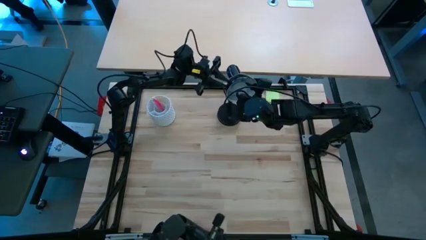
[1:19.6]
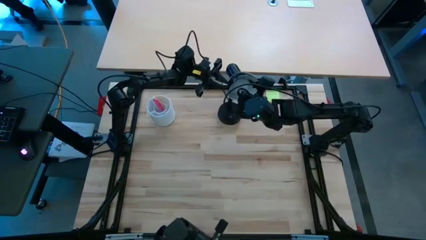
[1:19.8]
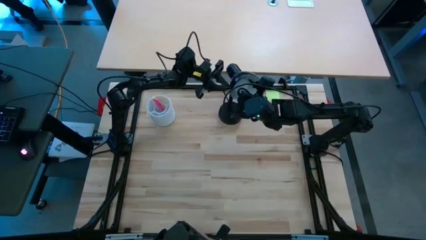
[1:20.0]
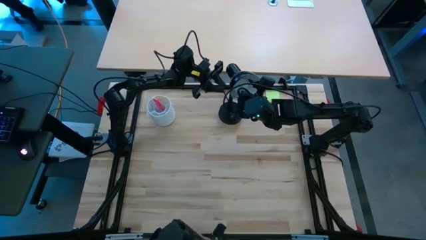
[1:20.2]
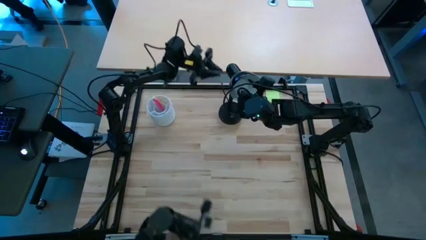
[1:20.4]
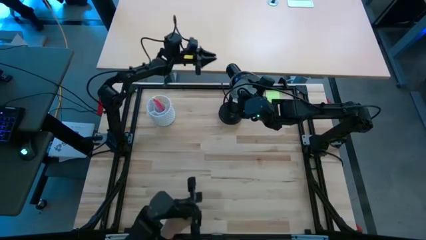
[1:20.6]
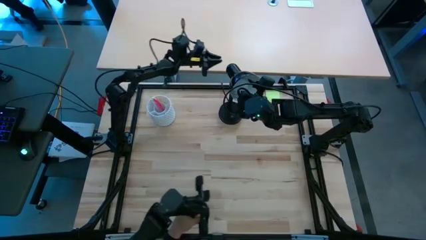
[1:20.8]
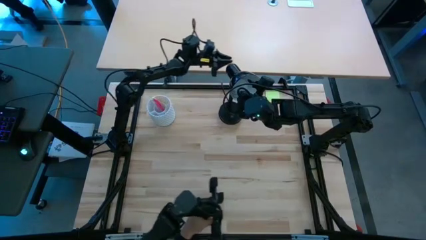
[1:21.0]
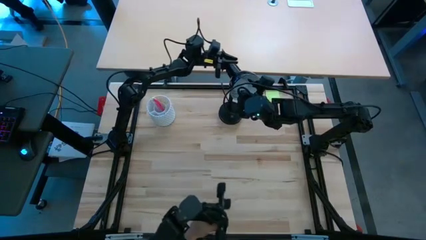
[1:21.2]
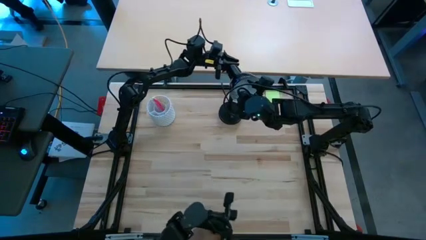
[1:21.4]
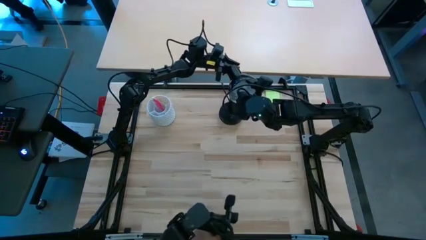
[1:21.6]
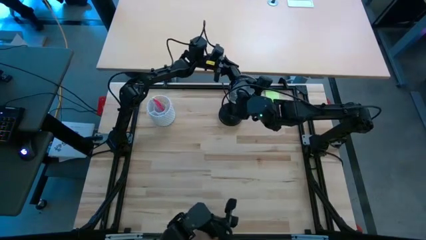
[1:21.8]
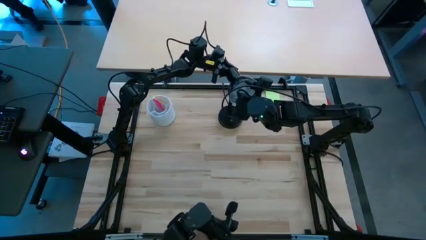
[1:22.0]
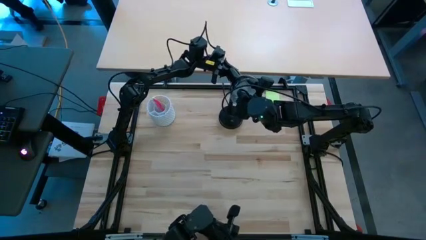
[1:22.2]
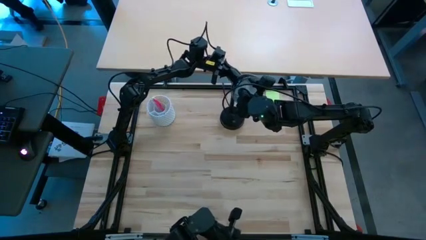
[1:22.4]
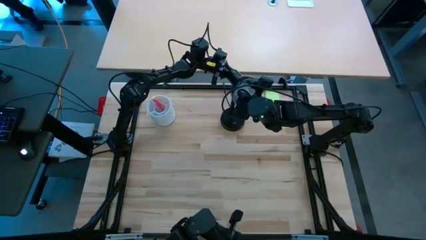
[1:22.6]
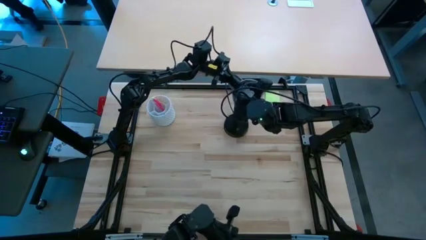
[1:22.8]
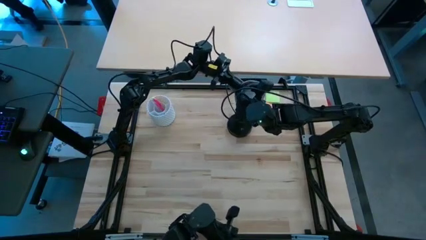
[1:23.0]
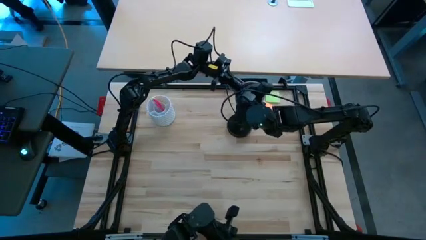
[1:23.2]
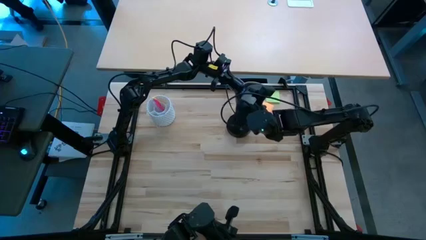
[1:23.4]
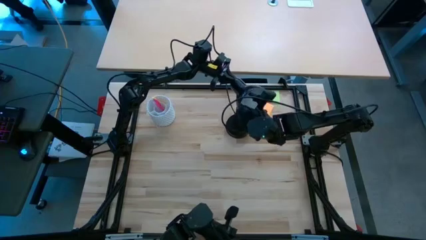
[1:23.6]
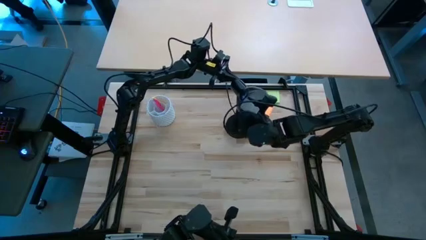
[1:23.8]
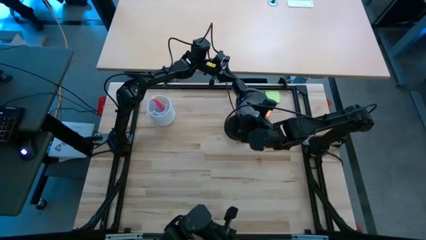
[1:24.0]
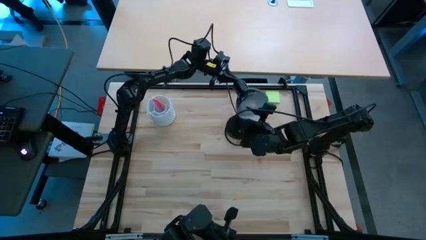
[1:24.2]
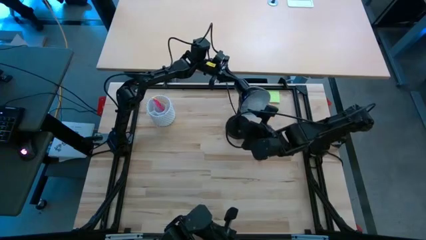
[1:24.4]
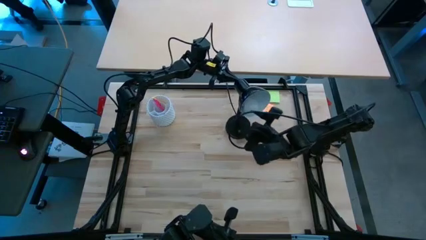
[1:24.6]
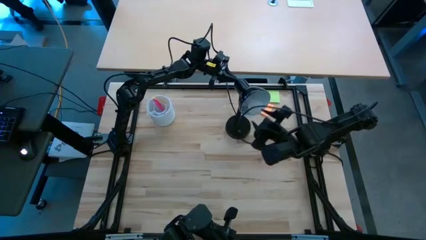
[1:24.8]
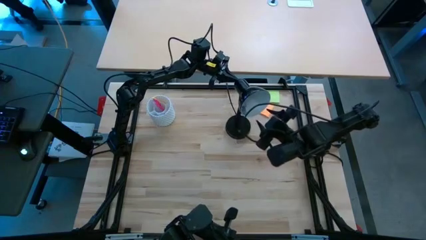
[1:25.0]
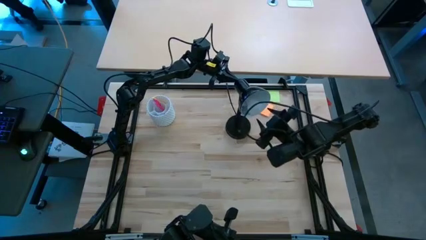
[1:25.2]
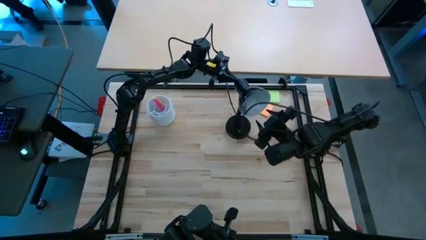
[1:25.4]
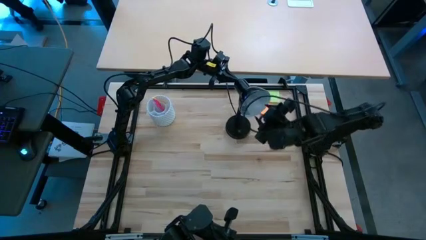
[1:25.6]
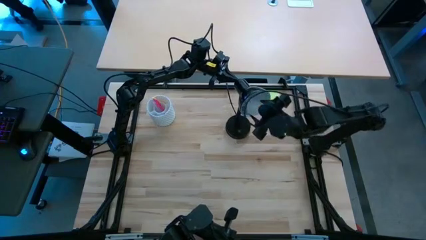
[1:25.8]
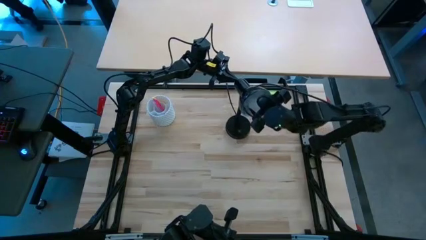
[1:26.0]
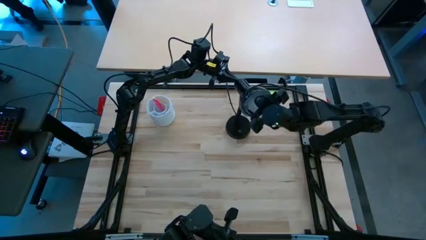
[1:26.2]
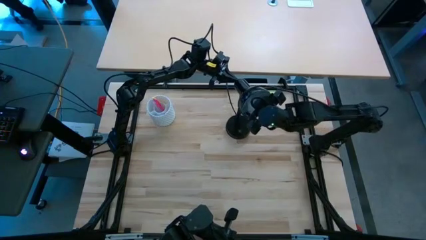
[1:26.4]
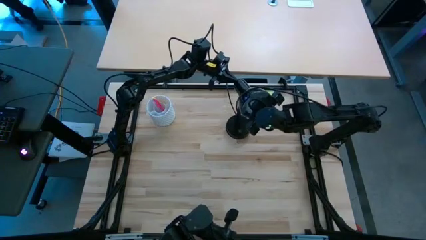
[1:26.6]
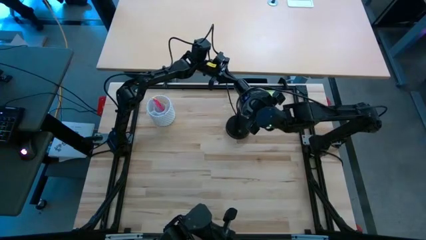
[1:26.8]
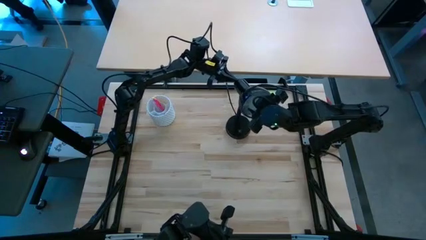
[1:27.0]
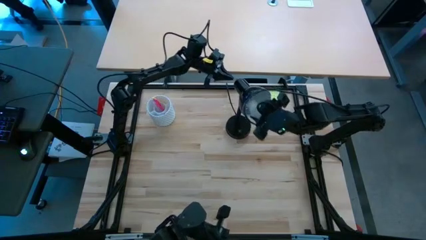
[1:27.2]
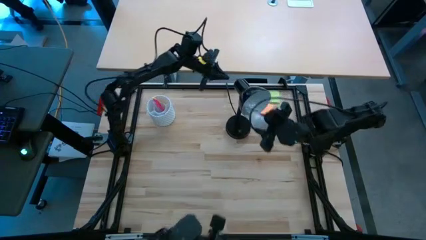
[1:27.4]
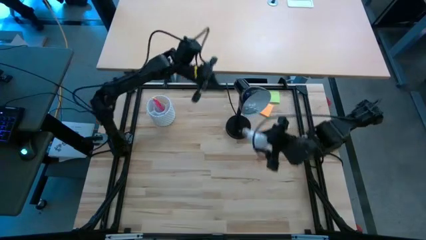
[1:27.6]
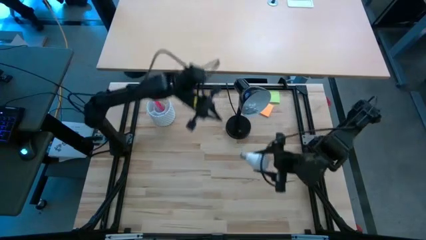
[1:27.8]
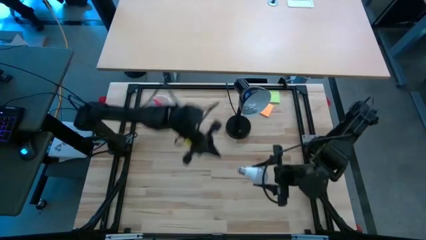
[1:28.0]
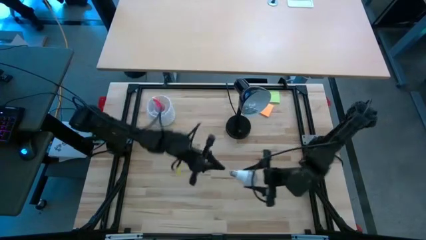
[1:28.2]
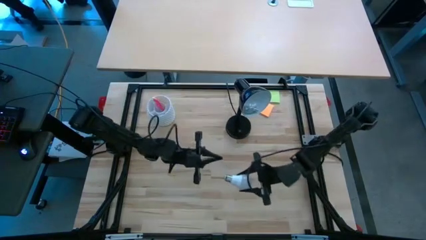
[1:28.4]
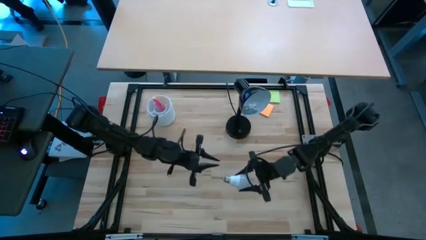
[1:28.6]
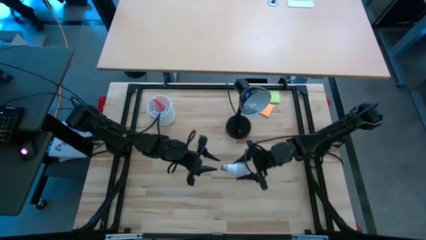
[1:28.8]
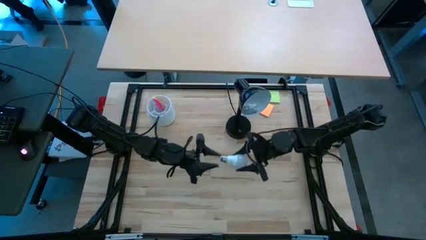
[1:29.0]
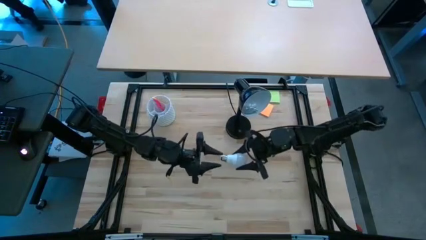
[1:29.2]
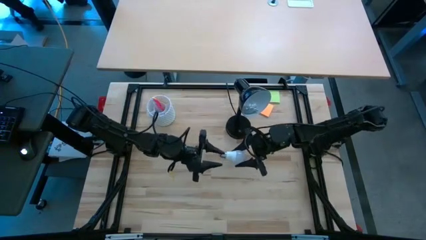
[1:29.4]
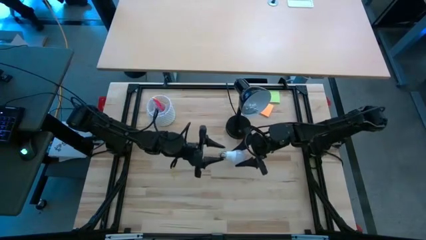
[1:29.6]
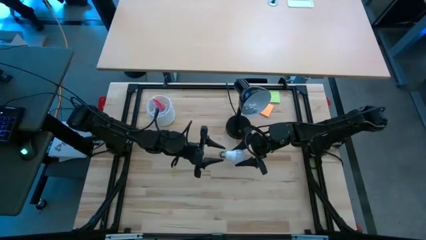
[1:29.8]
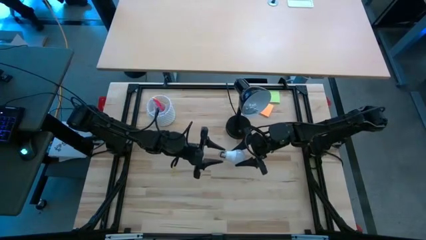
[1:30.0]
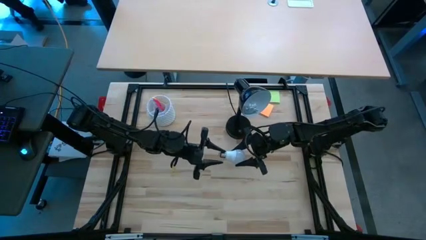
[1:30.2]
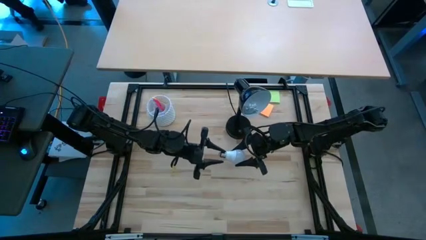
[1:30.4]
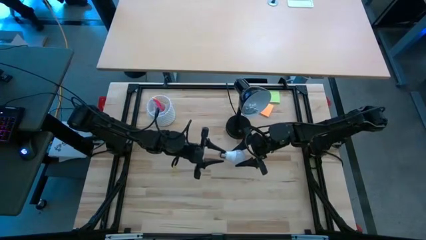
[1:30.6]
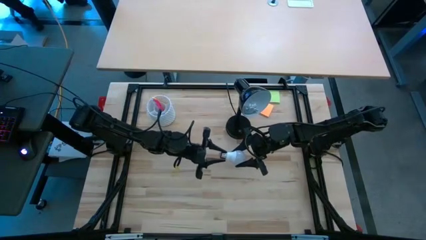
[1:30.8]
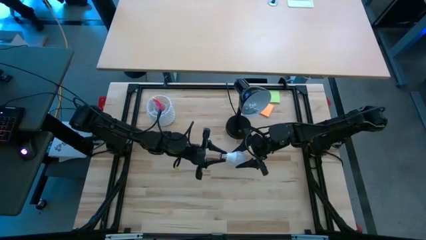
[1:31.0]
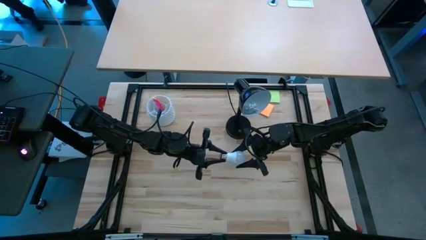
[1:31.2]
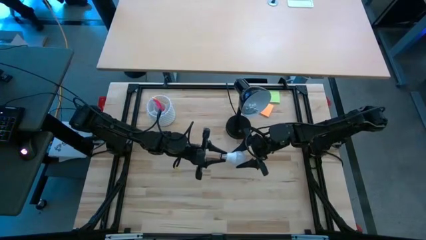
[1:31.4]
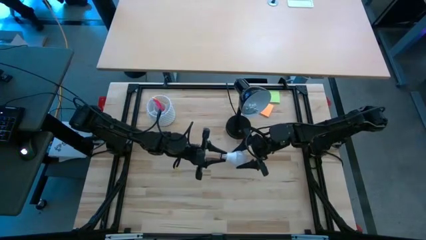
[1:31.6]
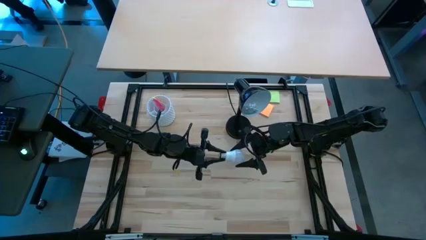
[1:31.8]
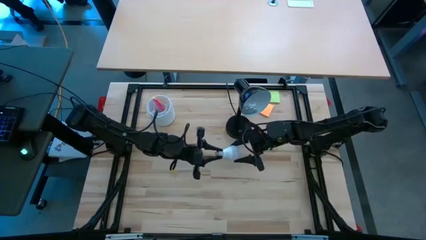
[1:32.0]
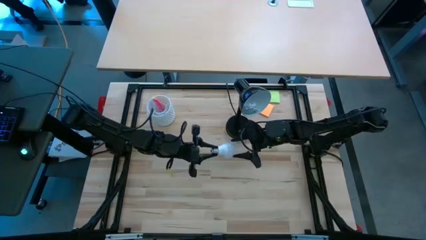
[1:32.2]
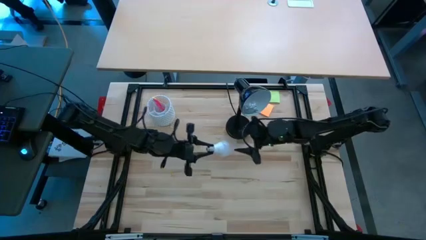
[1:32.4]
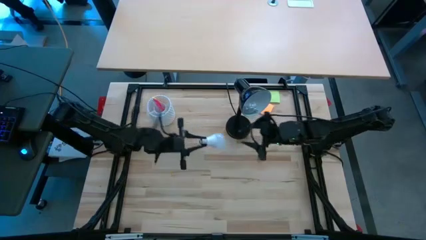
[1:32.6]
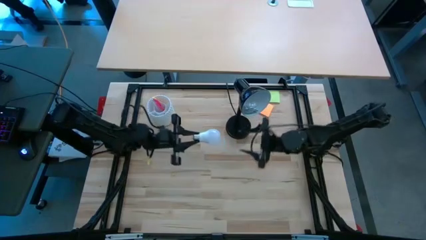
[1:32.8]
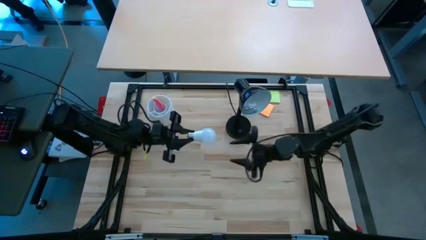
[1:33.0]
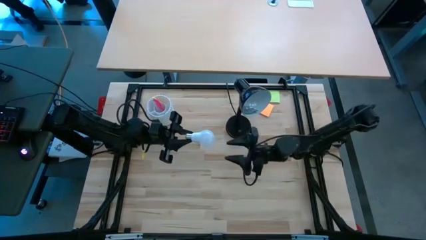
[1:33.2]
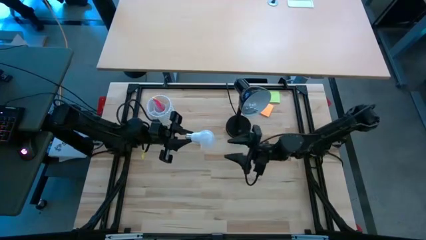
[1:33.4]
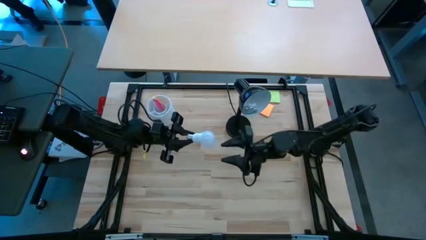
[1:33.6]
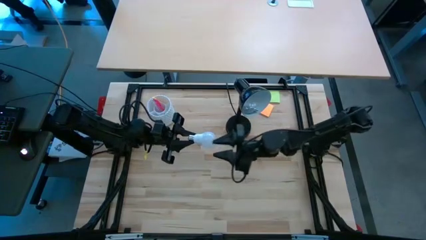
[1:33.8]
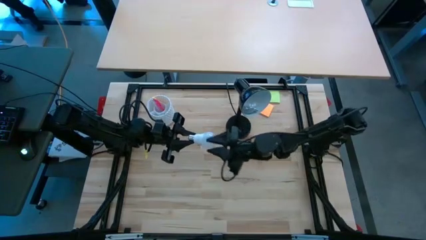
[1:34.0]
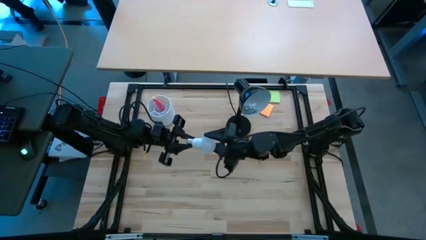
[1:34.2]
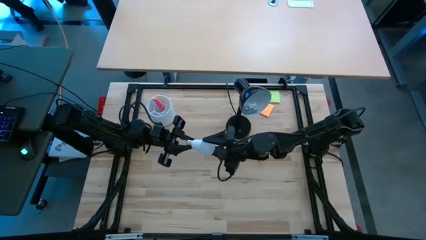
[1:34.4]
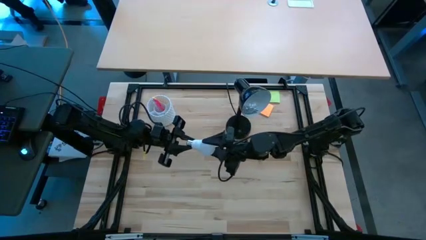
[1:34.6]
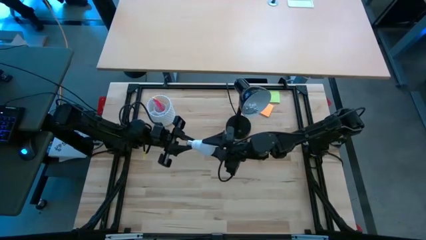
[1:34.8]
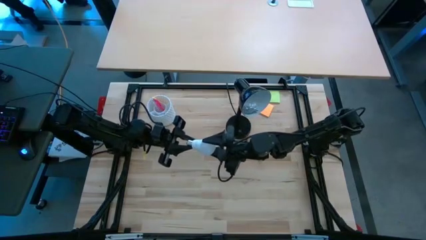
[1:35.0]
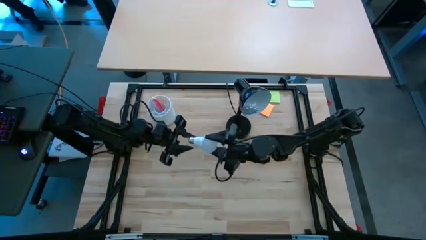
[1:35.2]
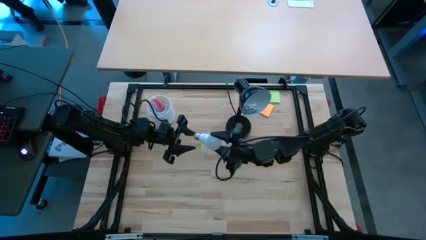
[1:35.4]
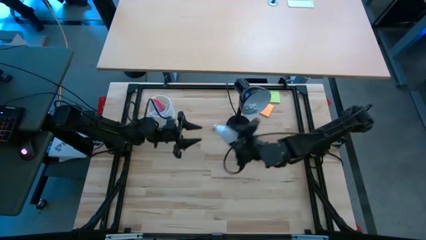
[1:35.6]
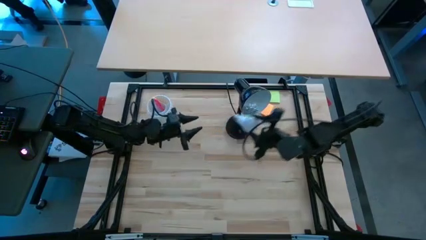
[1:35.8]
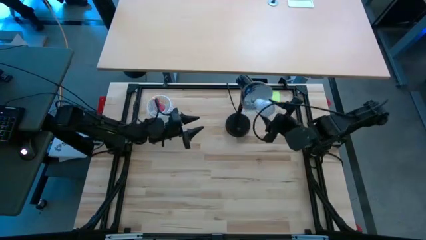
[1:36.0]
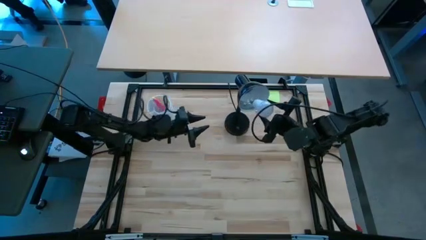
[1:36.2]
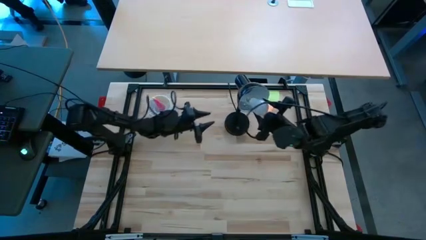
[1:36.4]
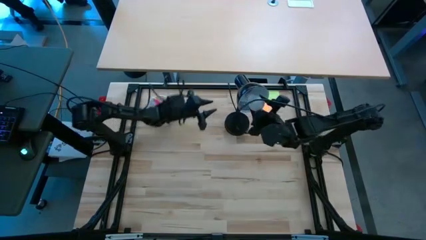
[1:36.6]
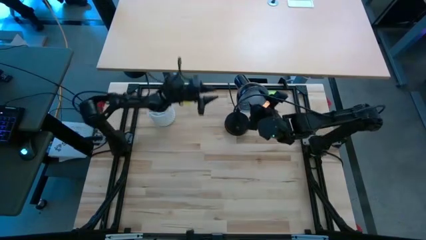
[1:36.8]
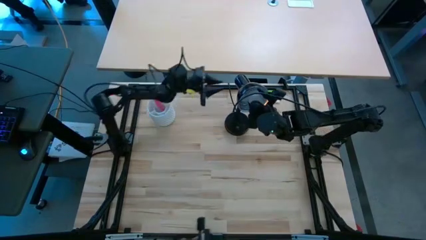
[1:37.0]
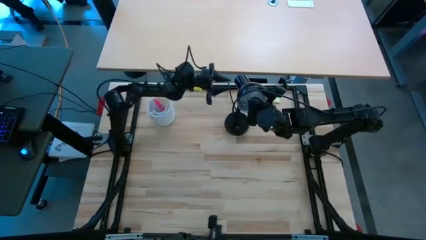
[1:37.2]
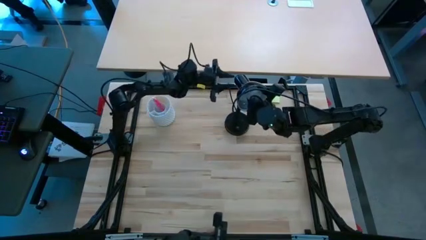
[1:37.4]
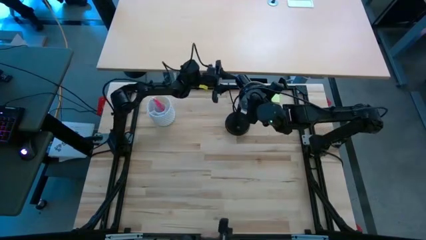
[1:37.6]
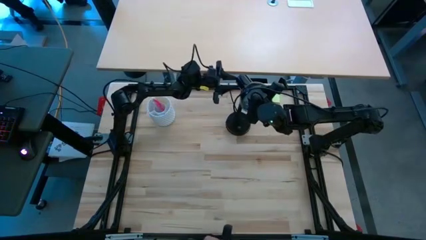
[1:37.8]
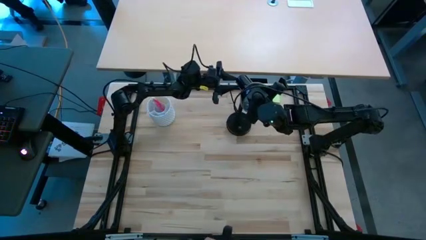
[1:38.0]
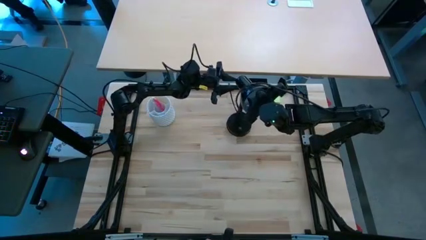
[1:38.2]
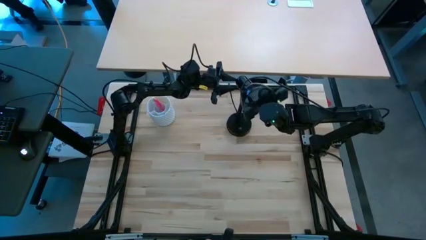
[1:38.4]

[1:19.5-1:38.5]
Task: Screw lightbulb
Insert the light bulb into the desk lamp
